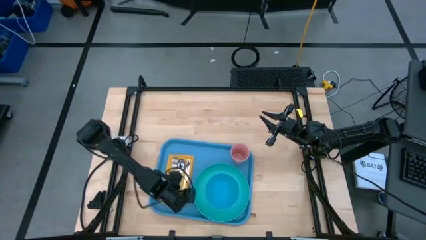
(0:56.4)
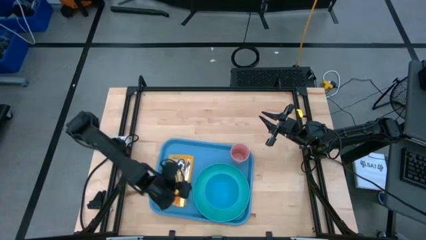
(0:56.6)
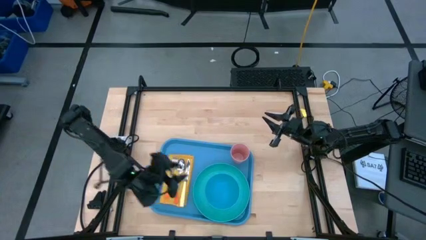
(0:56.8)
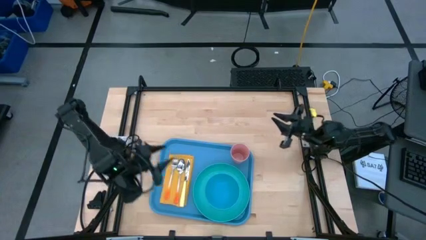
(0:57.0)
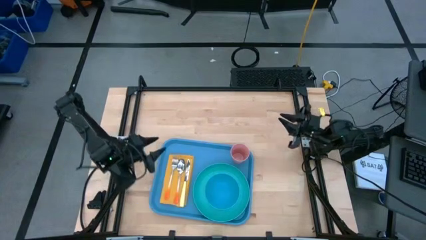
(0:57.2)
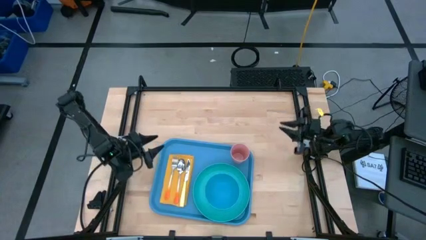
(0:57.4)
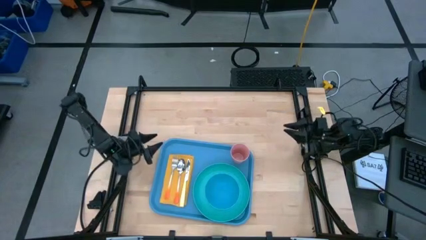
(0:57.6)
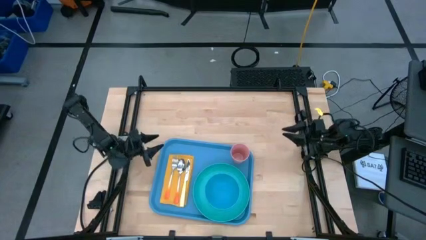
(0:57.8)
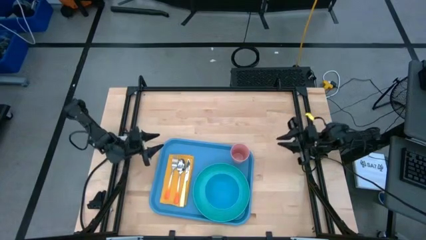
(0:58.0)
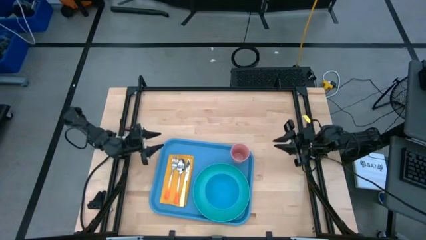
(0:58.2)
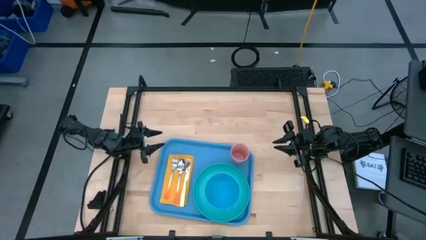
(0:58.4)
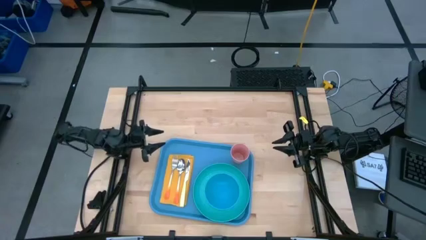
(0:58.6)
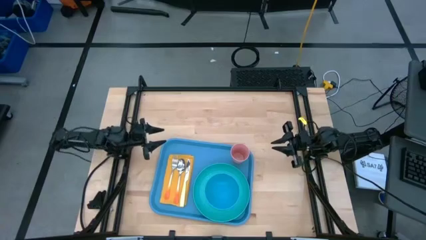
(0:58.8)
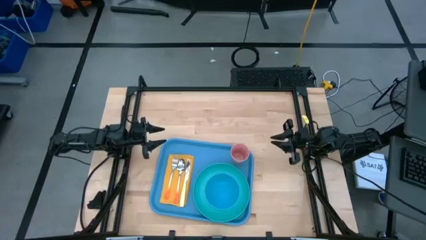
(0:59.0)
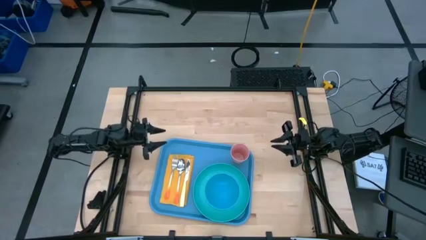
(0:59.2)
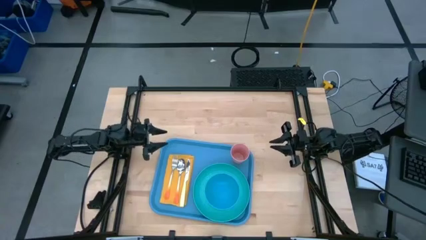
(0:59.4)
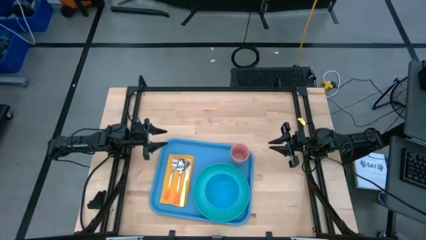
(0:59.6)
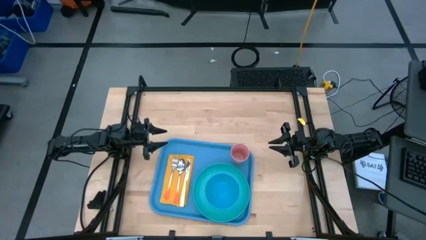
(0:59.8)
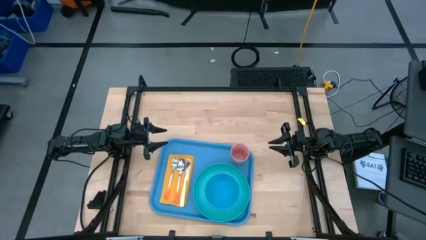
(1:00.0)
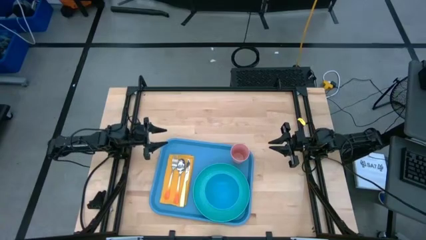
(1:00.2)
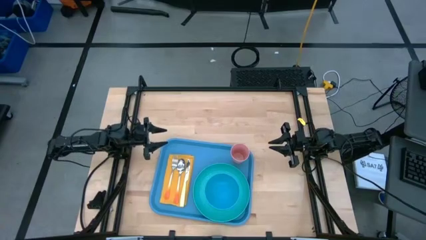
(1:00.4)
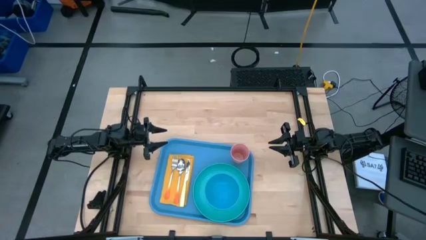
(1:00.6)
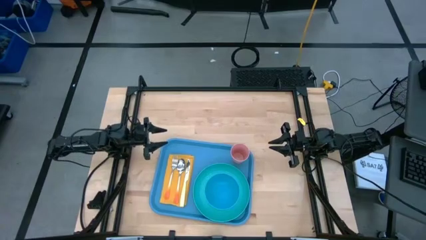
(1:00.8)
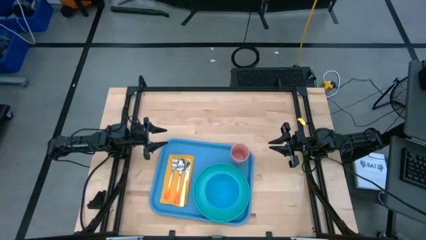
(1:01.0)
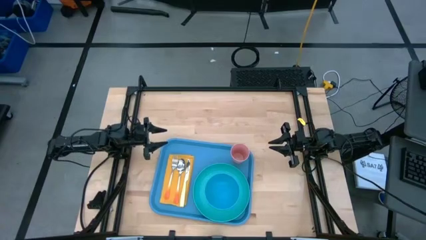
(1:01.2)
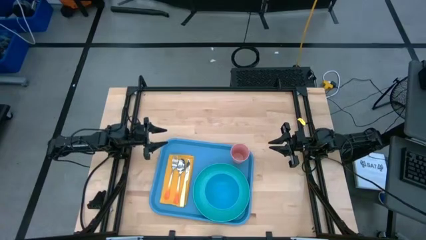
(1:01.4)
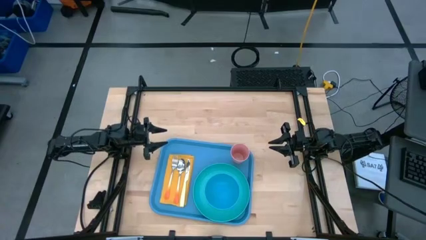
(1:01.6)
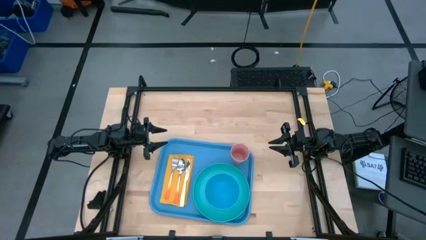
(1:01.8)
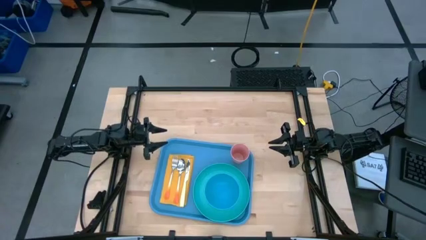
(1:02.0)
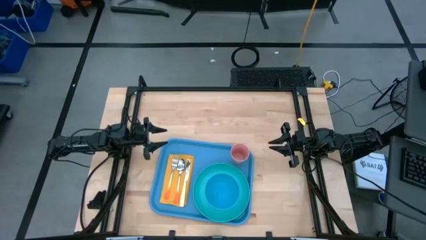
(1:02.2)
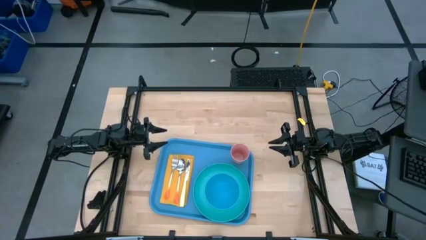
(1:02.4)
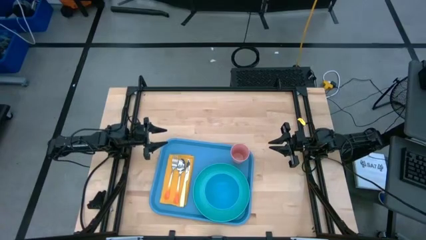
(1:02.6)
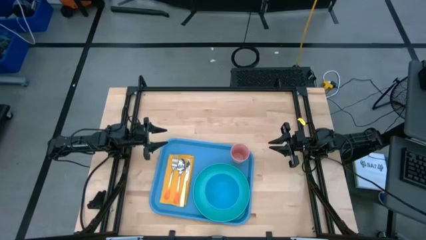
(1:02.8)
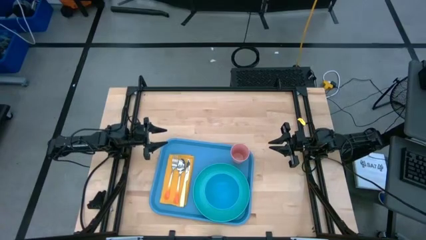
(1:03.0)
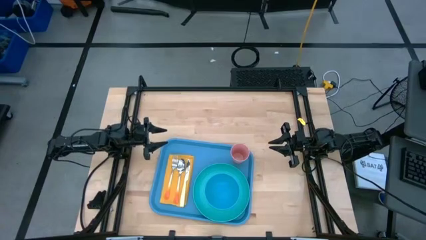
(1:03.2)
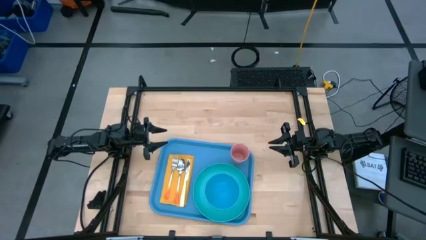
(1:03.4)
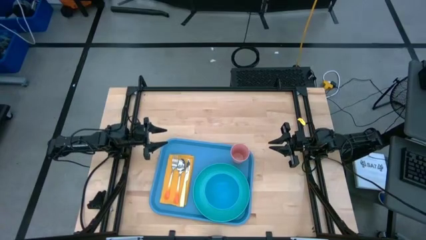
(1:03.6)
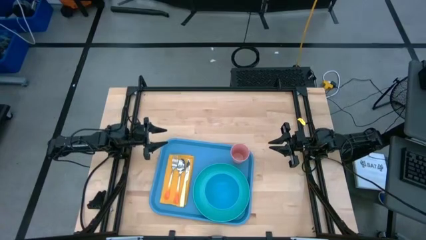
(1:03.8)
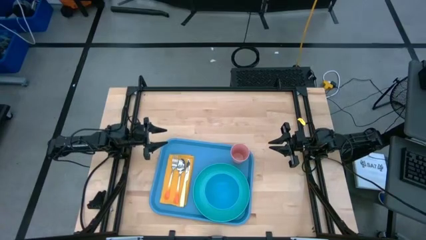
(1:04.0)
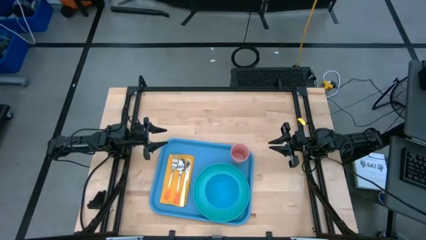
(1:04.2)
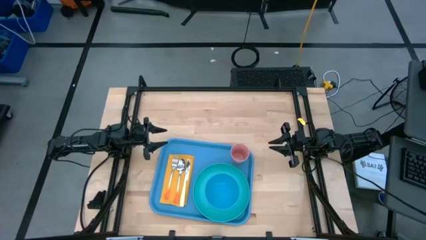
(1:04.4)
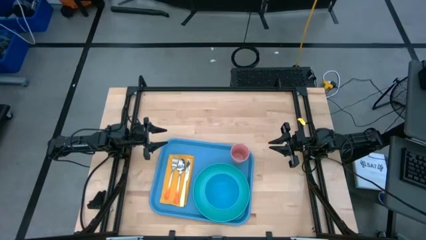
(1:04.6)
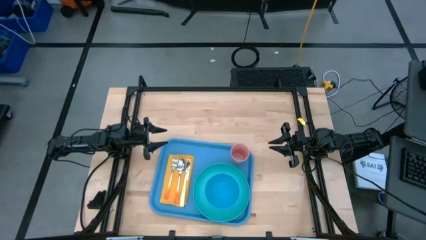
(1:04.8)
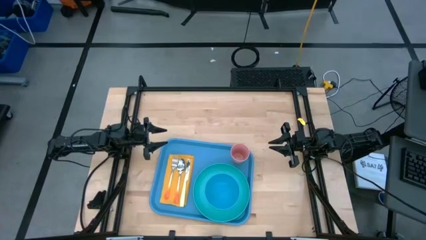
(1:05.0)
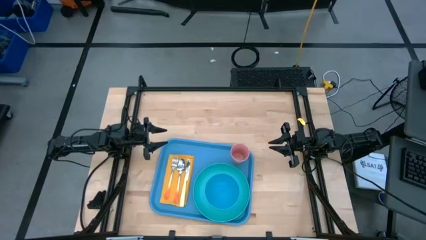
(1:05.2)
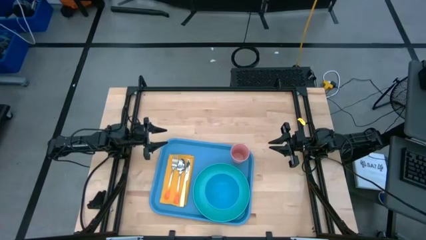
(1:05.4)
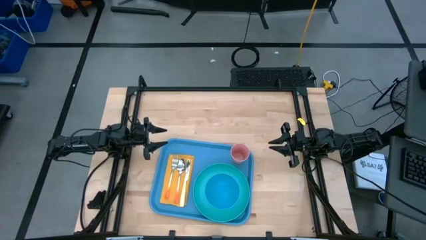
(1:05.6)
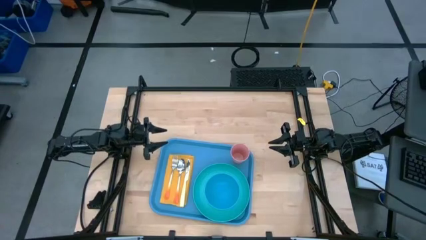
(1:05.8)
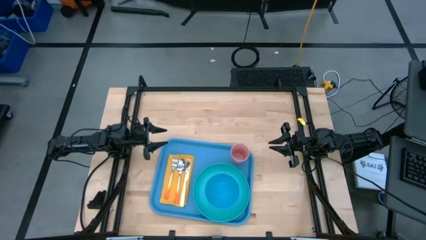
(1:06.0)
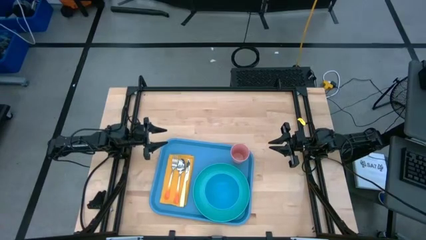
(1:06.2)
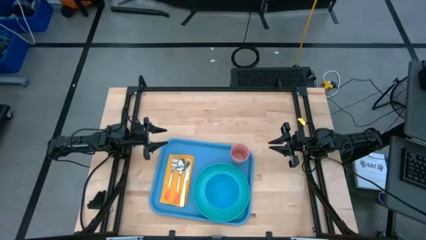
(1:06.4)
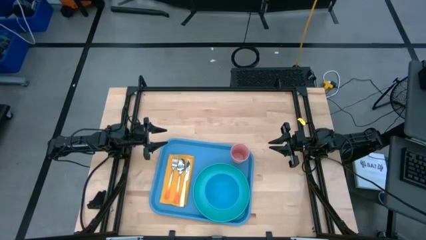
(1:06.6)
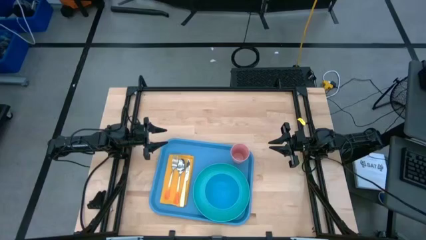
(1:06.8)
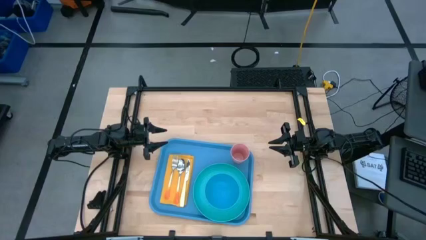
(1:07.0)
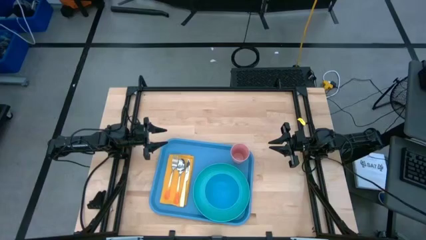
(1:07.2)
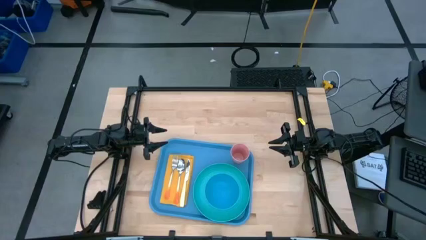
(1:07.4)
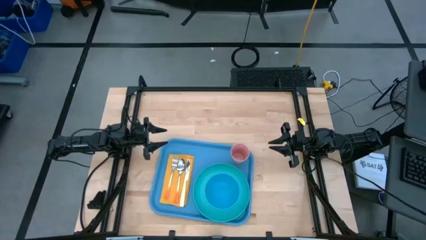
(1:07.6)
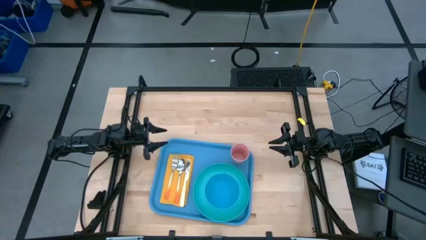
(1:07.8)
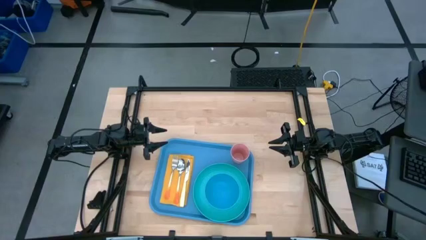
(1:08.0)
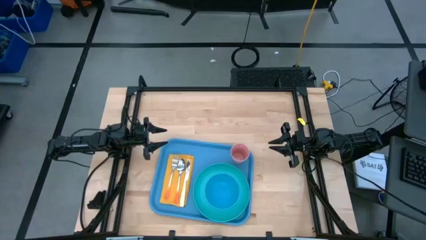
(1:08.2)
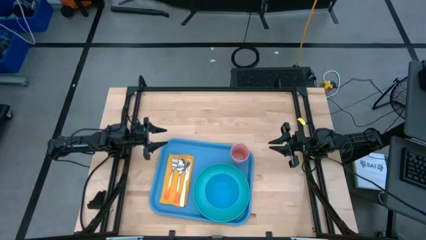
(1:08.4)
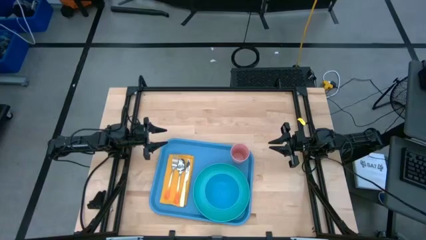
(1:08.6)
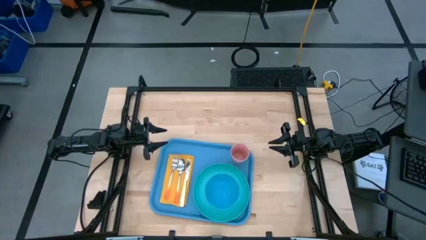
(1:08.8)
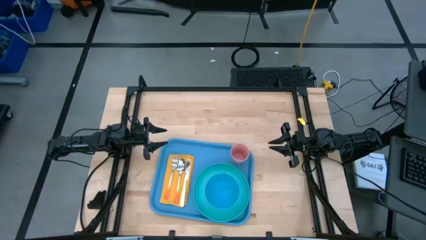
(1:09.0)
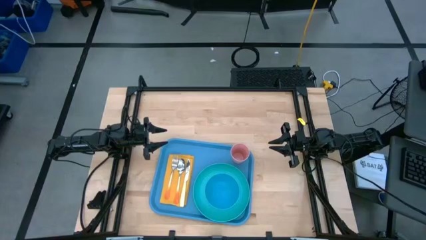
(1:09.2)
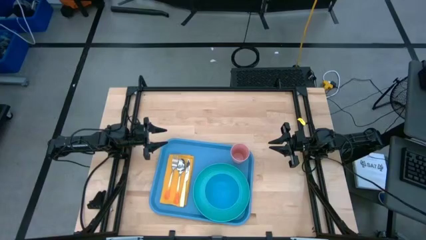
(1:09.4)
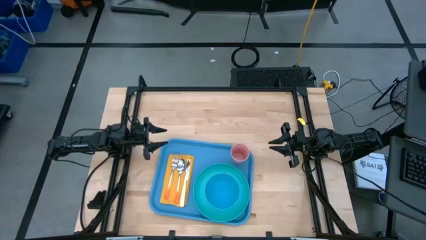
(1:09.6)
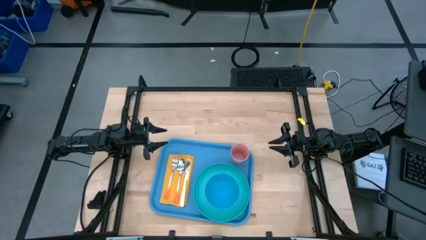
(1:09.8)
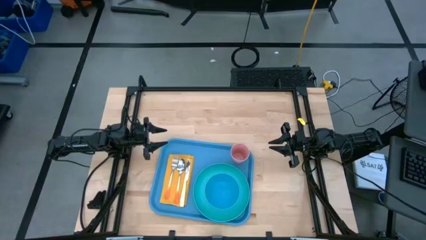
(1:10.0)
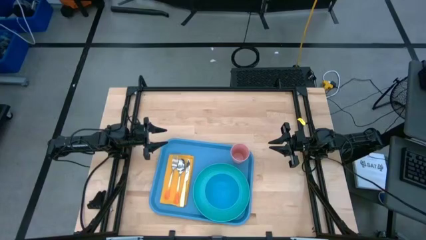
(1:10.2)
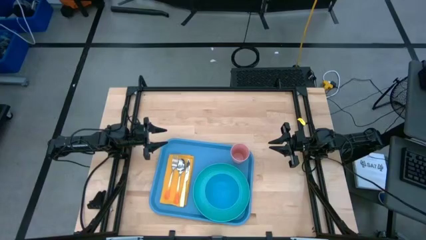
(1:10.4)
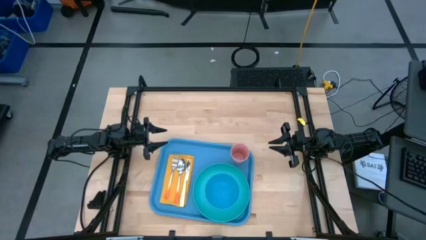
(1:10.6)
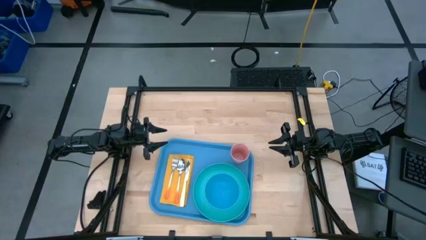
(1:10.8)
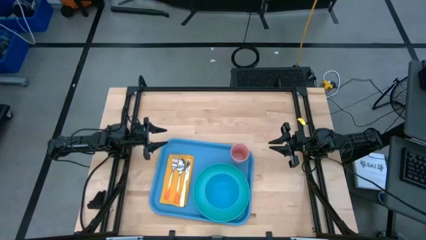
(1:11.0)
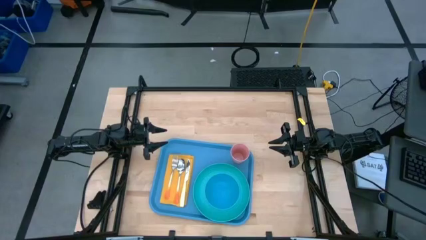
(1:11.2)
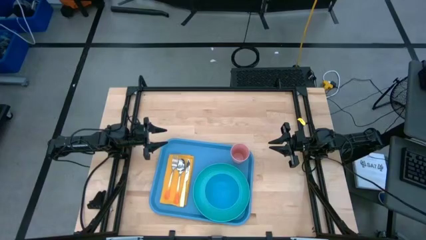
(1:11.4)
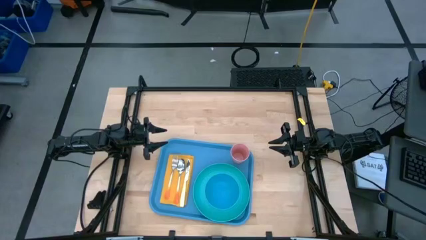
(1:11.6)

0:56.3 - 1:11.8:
Task: Set up tray
Return to Home Position

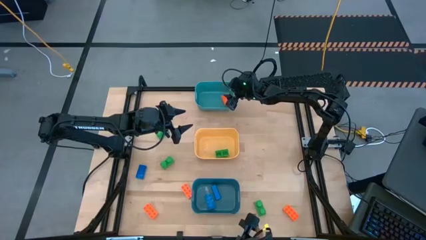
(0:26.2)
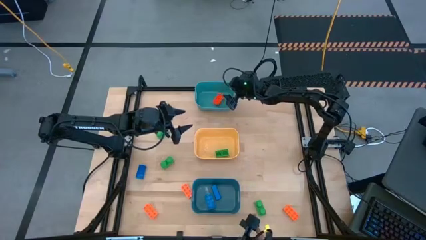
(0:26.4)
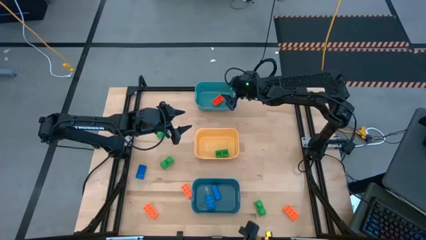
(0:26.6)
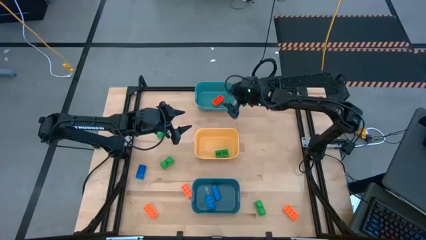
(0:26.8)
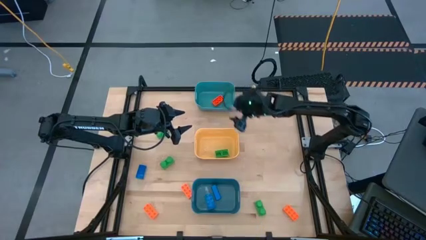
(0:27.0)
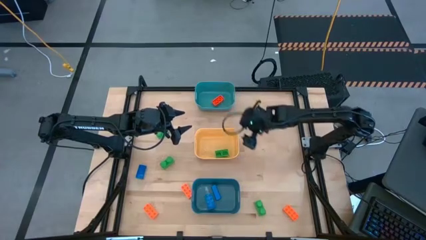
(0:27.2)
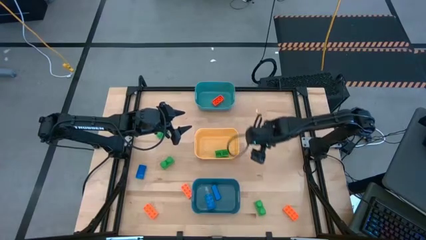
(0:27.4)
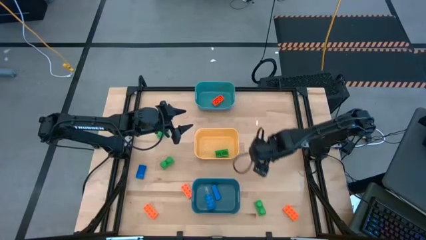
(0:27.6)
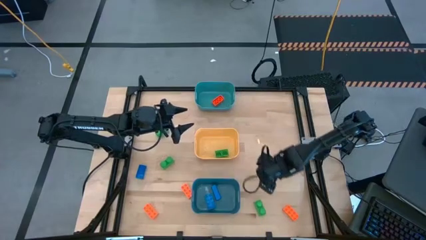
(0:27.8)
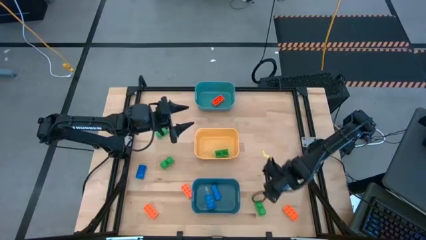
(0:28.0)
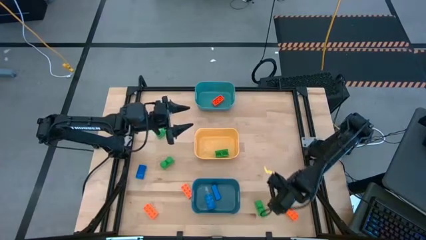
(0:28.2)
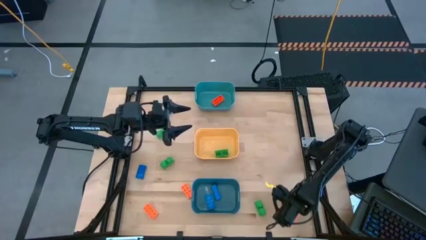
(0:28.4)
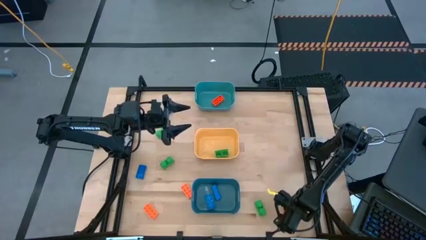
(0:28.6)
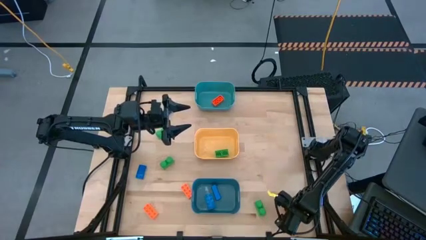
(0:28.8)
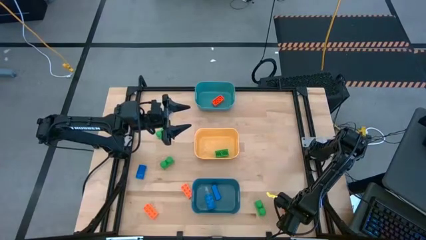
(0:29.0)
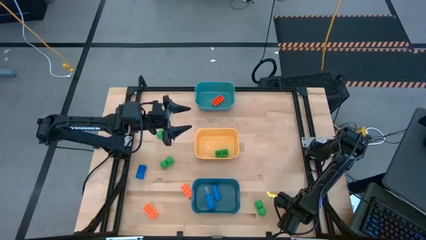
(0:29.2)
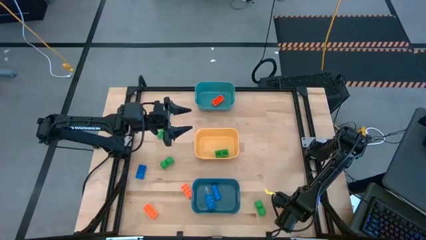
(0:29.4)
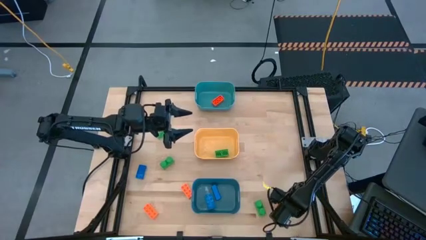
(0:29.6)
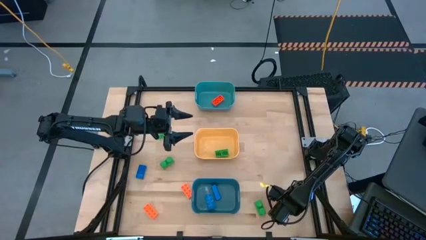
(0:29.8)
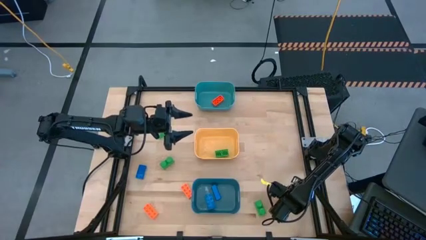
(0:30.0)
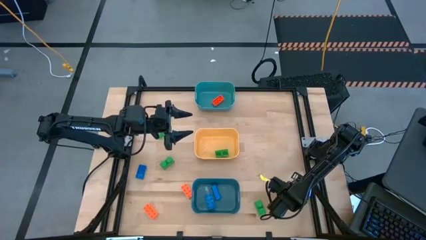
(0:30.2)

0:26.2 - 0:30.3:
Task: Sort & place blocks by color
Put the orange game piece into the green bin
